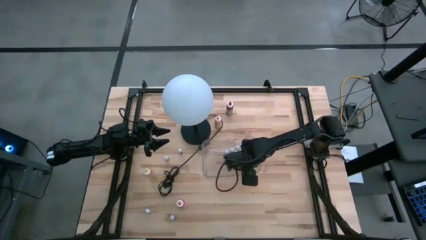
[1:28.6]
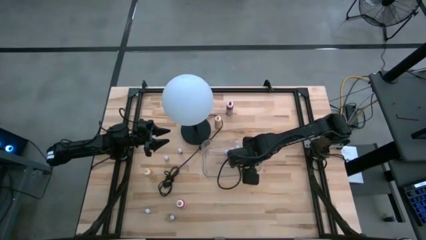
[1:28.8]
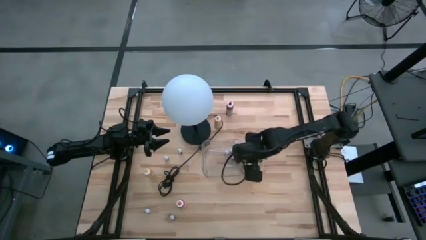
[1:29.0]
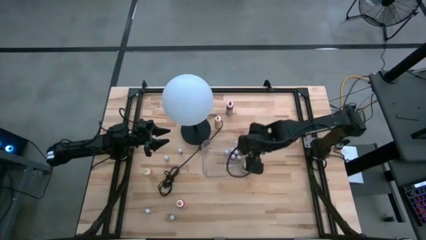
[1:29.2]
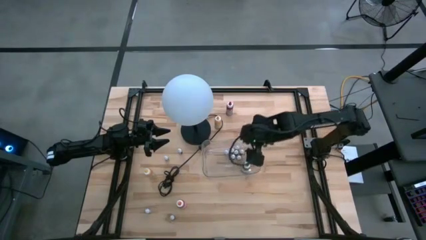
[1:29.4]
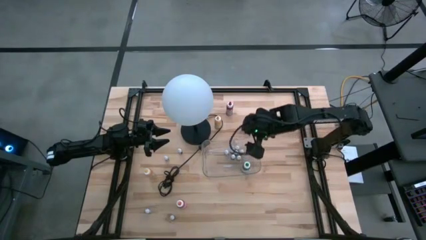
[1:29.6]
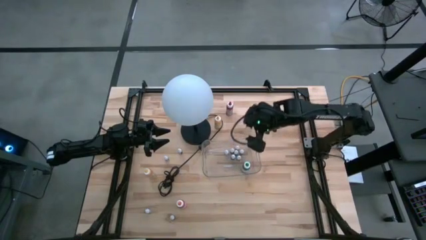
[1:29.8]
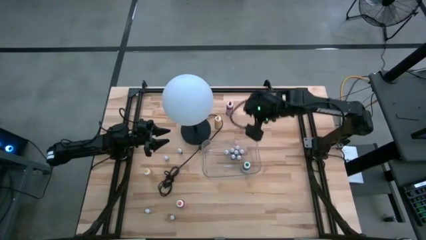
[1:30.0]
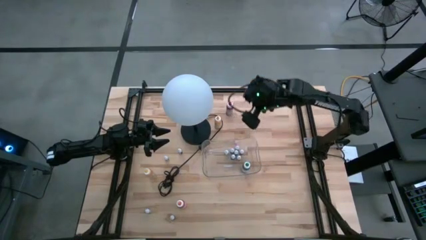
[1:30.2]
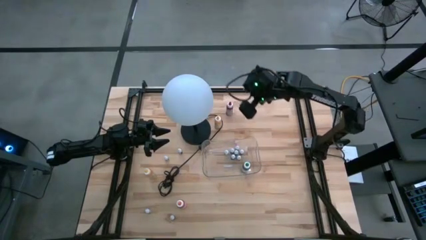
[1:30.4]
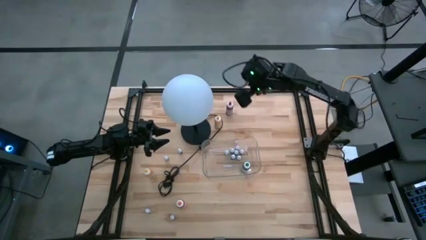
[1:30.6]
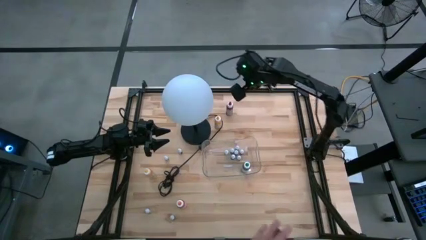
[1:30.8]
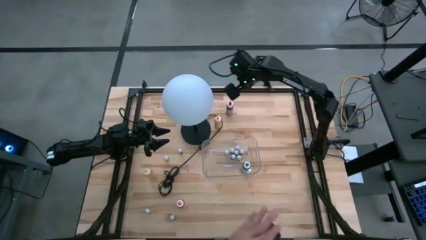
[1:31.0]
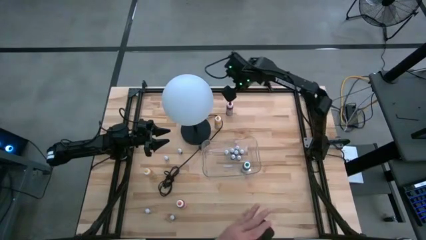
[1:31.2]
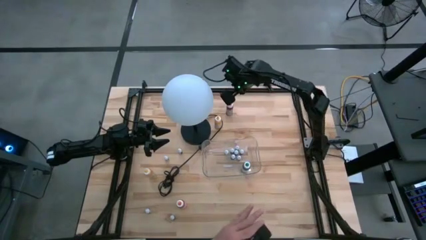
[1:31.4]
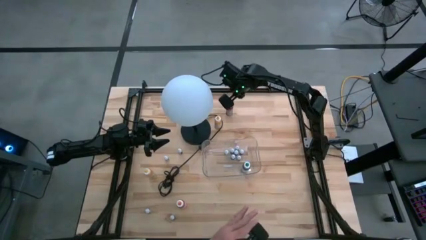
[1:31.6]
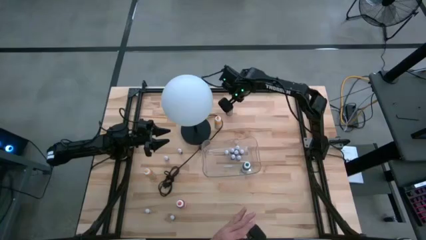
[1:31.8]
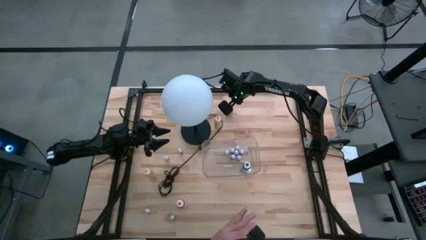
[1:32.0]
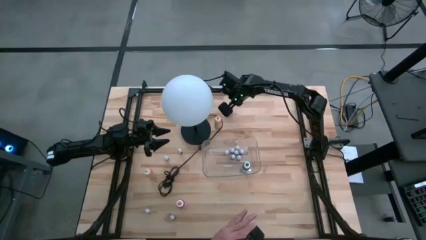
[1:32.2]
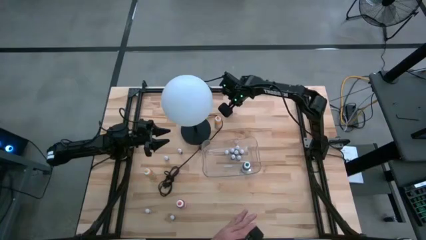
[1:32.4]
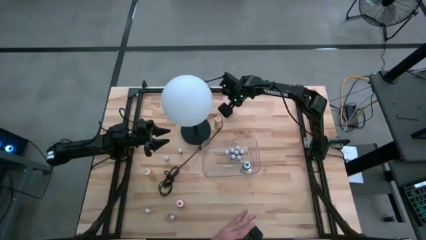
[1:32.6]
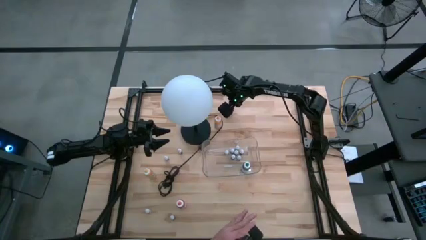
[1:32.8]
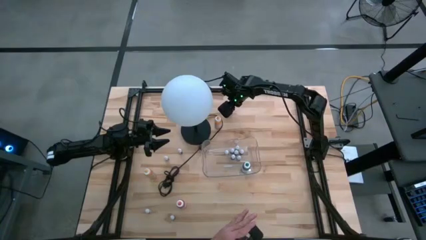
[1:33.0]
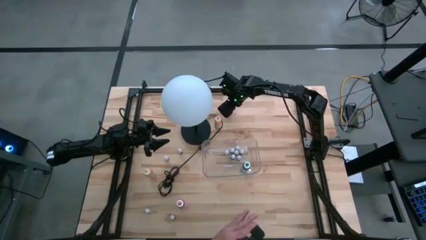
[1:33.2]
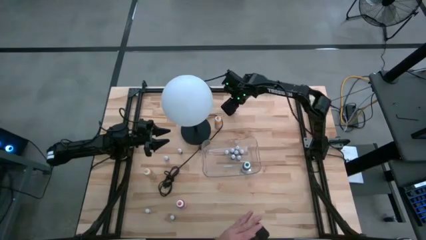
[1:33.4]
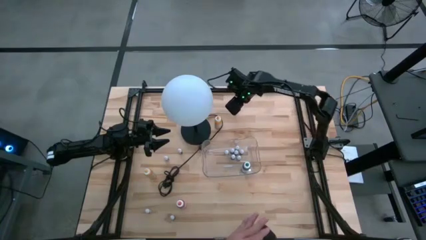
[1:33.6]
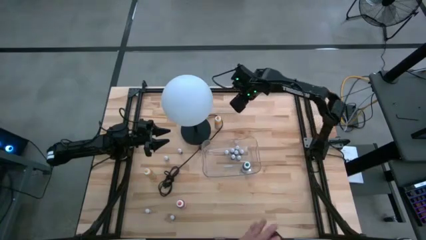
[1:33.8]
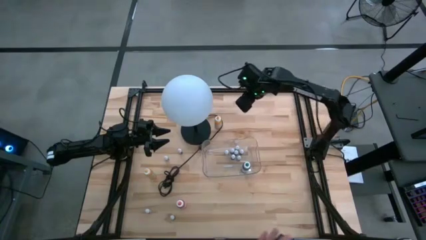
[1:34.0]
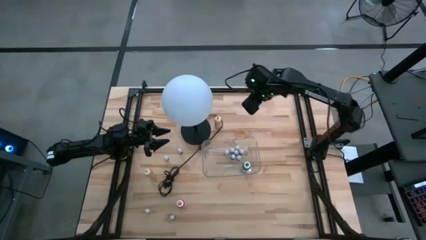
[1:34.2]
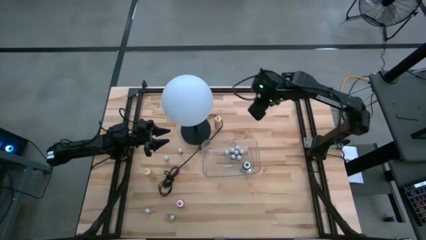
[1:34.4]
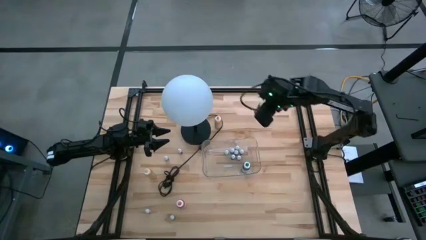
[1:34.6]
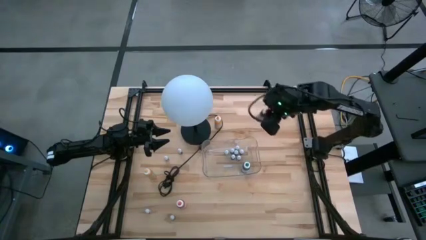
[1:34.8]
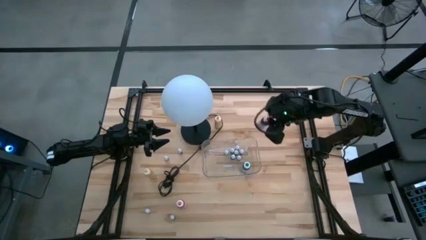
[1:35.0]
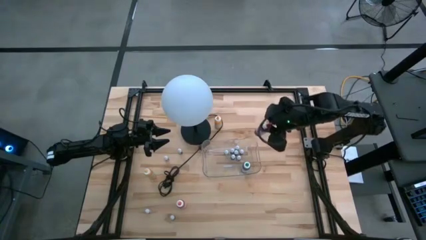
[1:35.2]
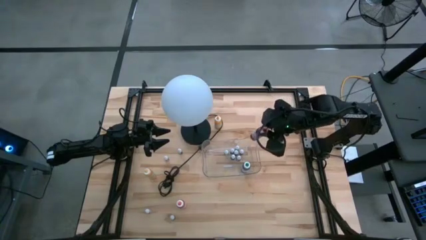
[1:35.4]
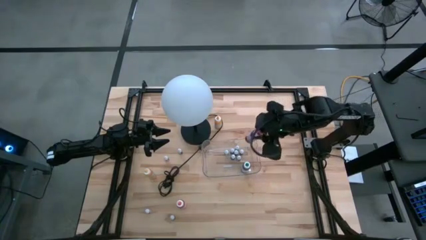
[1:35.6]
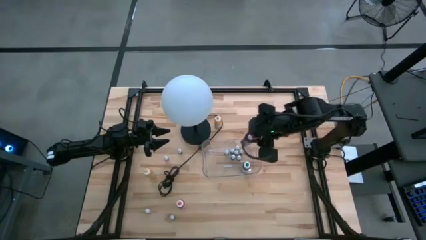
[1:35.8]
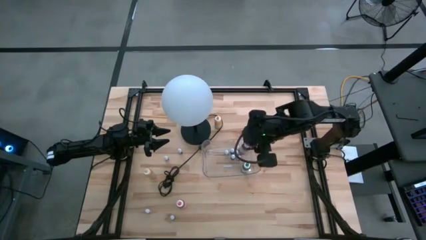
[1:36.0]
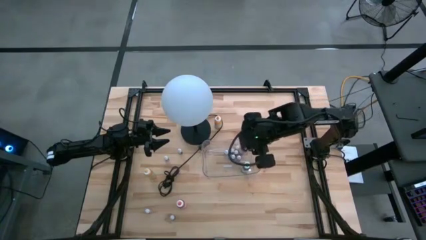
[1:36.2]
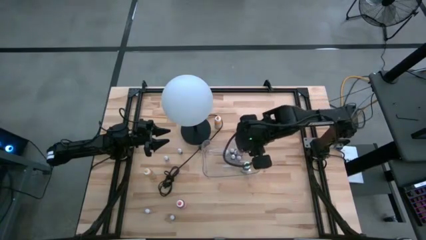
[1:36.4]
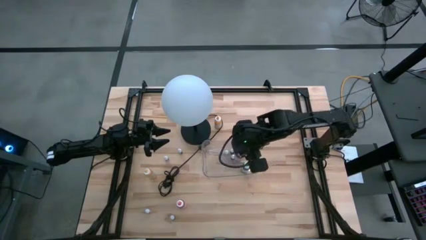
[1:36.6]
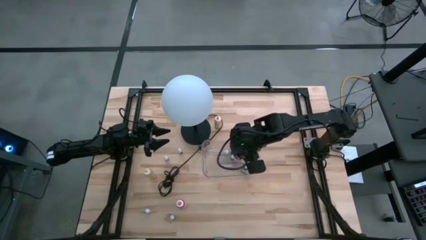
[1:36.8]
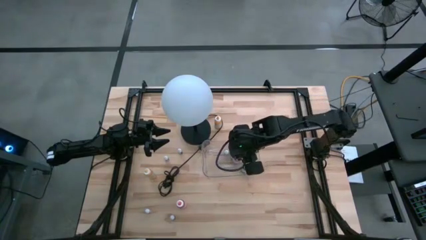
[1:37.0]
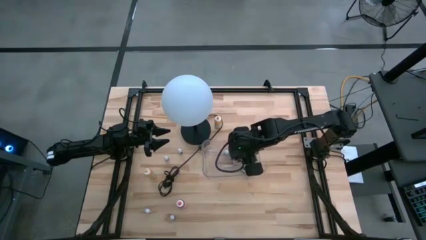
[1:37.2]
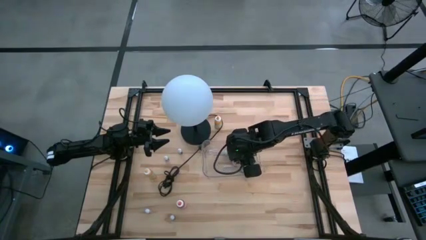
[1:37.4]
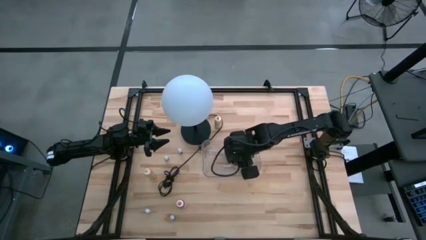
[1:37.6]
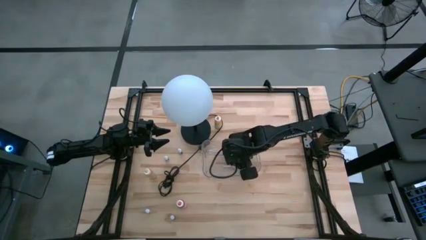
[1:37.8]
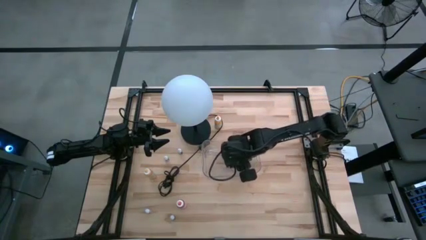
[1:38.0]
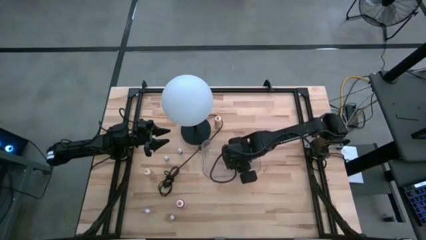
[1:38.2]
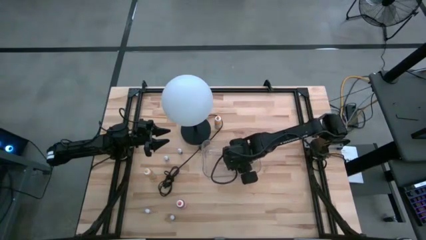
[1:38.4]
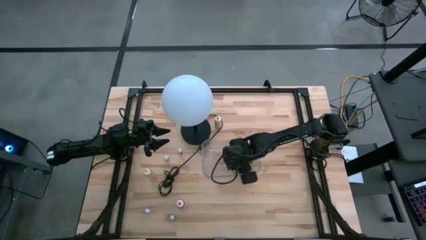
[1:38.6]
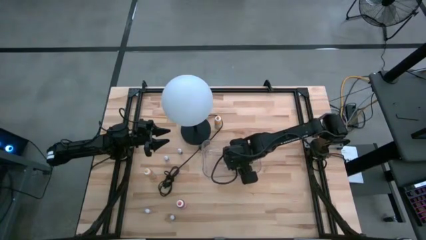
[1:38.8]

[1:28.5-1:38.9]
Task: Pick & Place food coloring
Put the large red food coloring bottle into the transparent bin

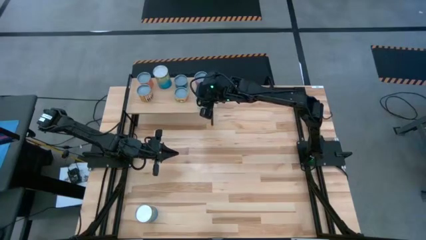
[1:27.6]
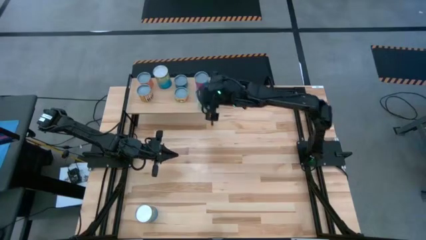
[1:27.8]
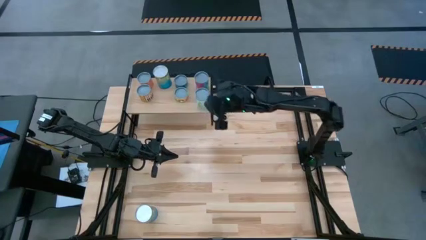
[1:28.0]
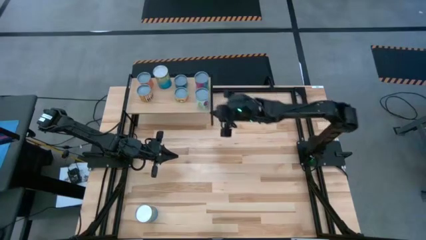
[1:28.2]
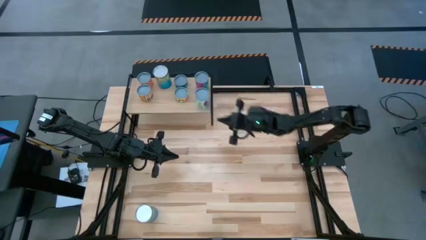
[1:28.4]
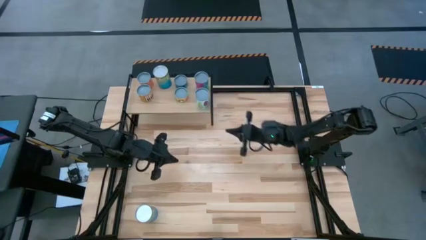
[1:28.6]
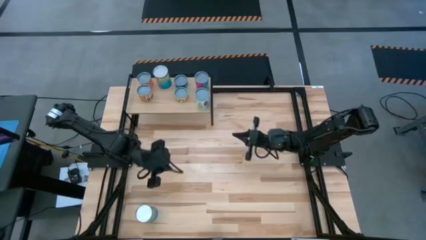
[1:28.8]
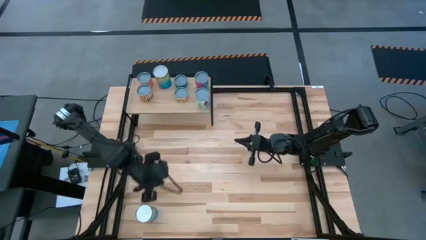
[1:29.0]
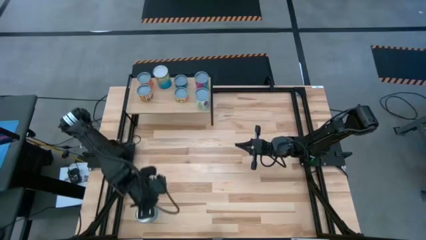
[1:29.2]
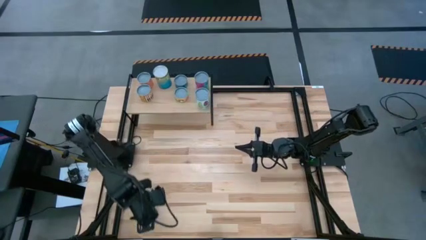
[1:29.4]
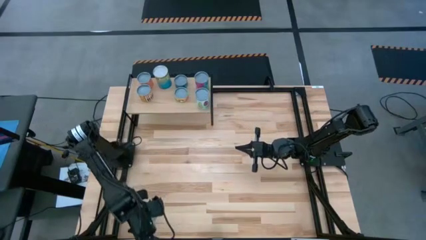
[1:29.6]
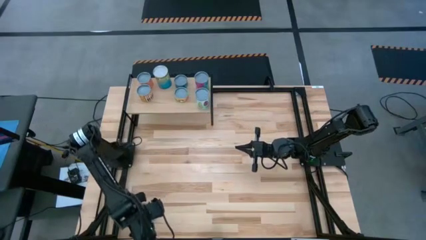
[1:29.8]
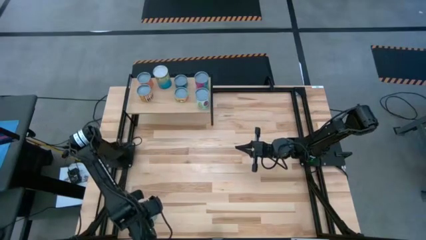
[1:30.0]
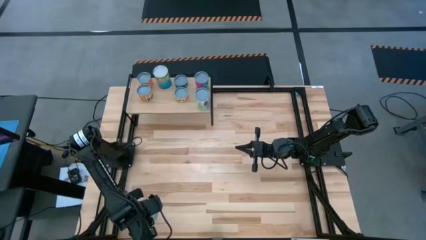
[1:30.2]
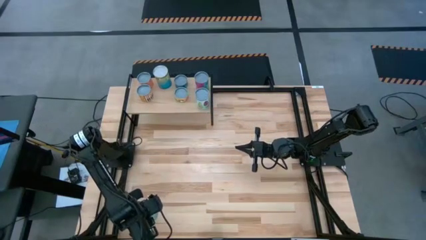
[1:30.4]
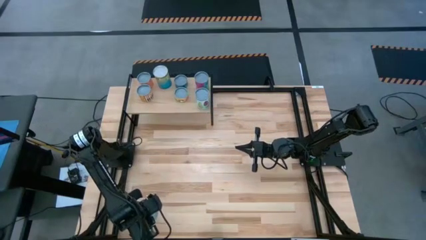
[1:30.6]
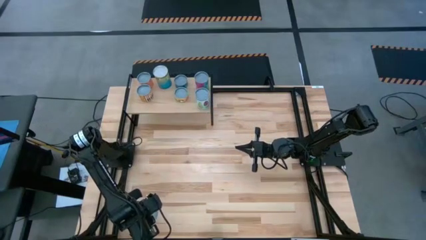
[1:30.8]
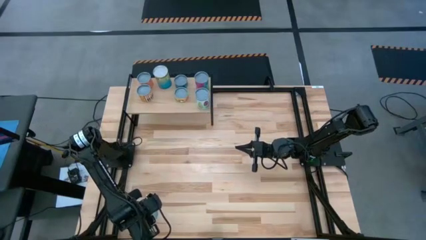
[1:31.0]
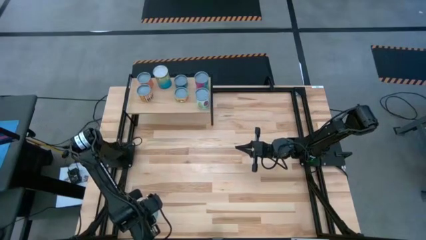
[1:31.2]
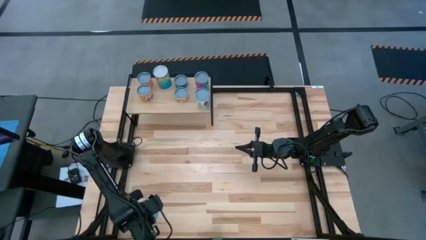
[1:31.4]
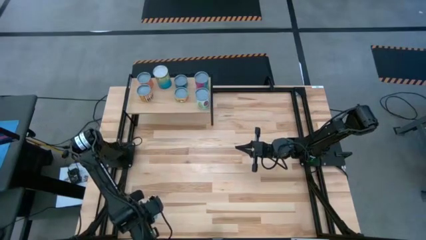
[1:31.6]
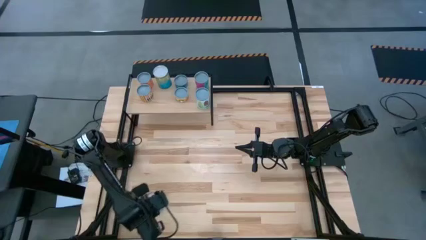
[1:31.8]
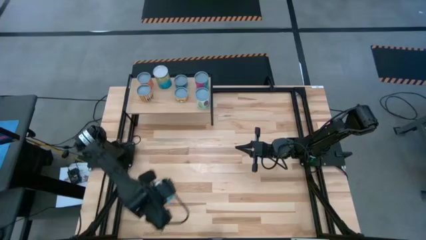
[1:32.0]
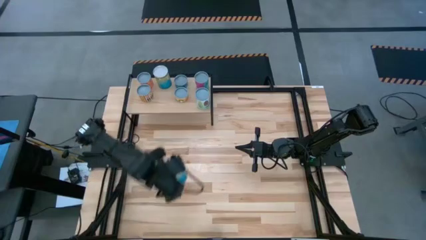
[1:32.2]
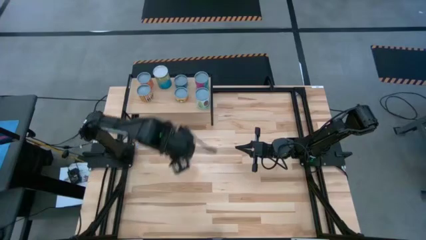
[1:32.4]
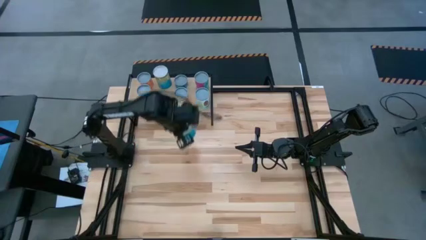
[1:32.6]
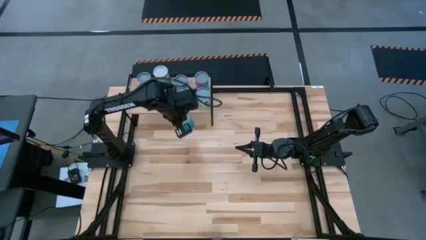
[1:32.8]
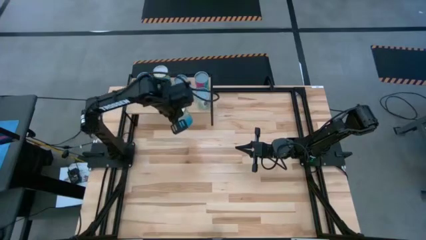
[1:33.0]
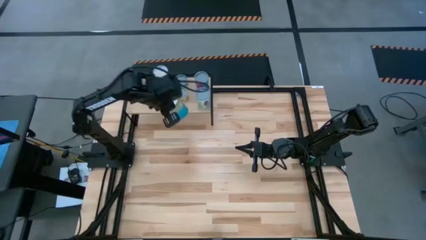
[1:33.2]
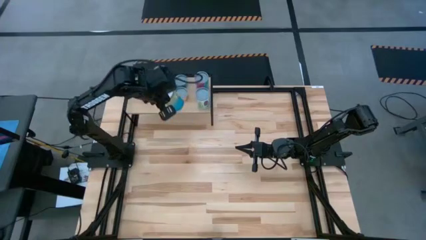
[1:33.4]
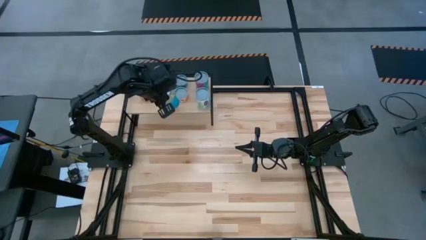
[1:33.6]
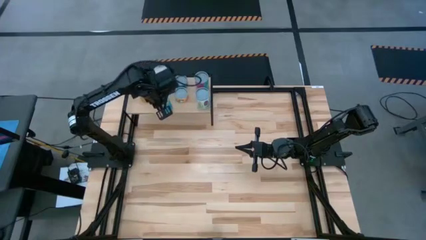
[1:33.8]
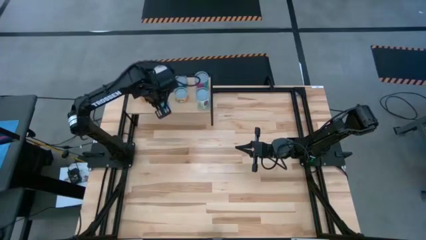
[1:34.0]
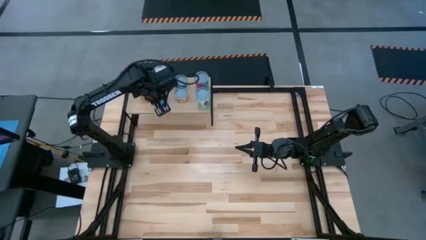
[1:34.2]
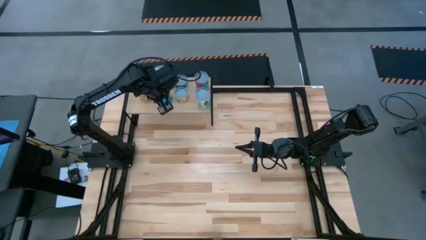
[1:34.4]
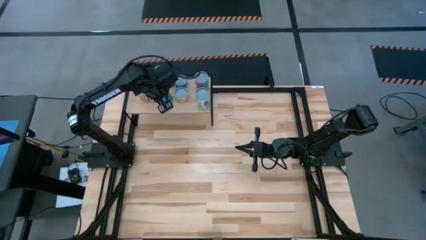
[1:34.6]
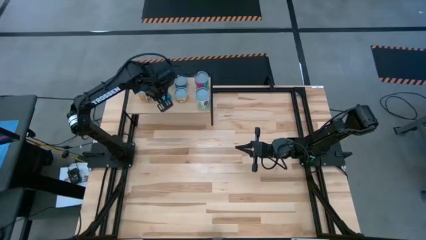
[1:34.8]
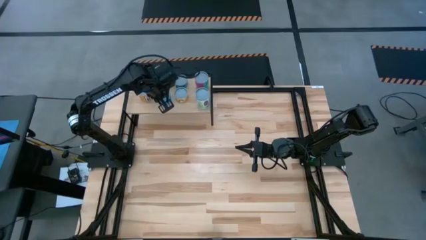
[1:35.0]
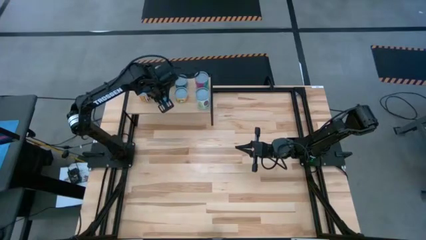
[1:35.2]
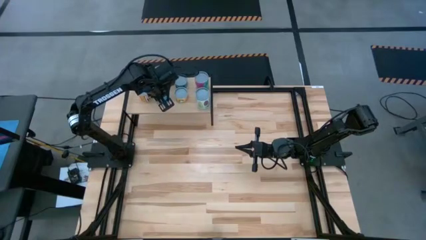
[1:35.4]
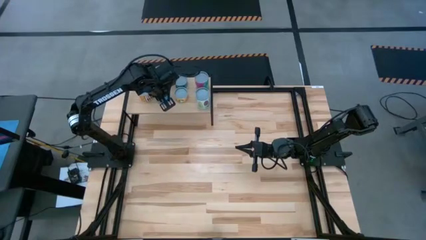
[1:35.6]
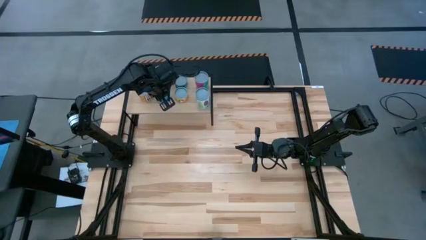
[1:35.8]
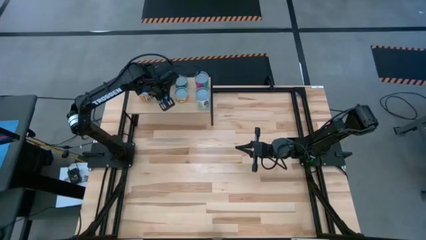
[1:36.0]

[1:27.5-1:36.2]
Task: Pick and place cans onto a shelf
Put the canned cherries on the shelf
